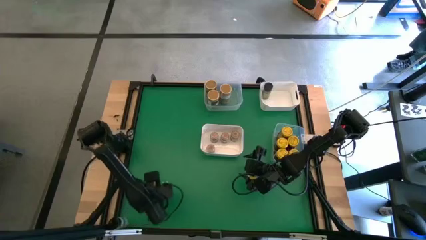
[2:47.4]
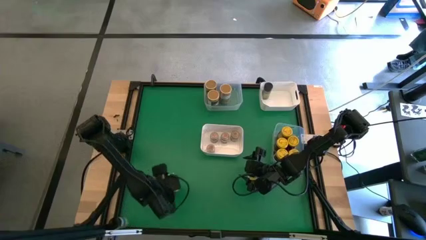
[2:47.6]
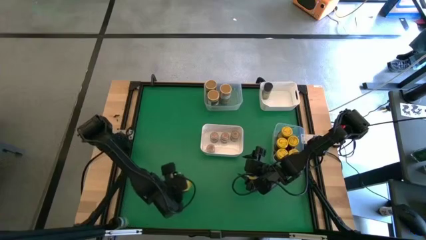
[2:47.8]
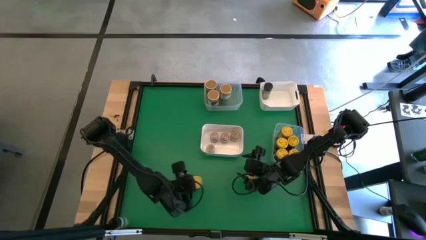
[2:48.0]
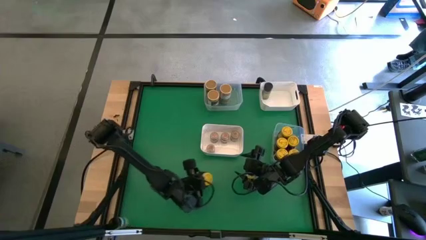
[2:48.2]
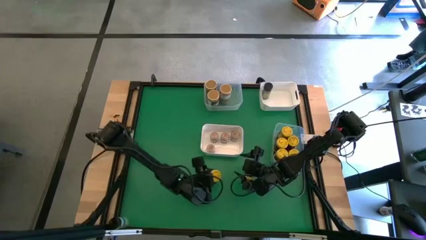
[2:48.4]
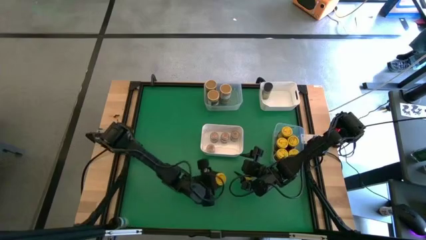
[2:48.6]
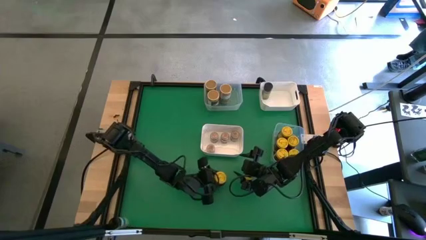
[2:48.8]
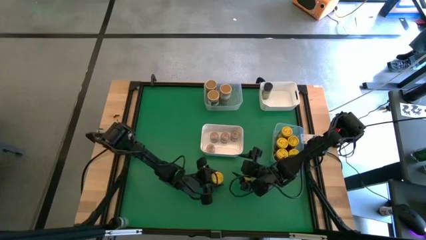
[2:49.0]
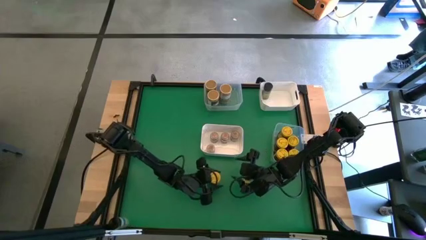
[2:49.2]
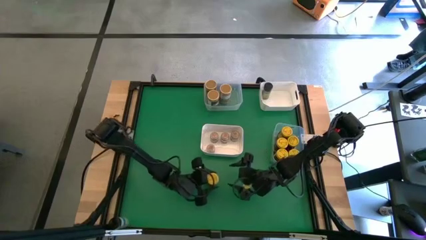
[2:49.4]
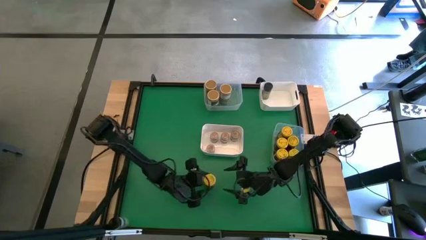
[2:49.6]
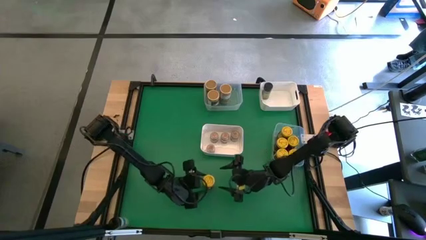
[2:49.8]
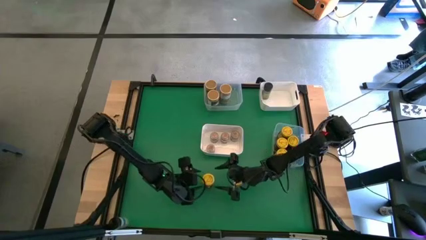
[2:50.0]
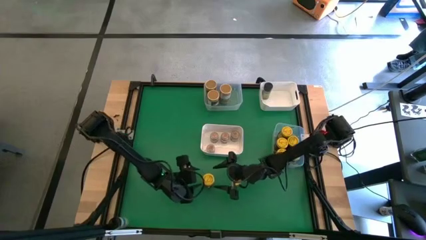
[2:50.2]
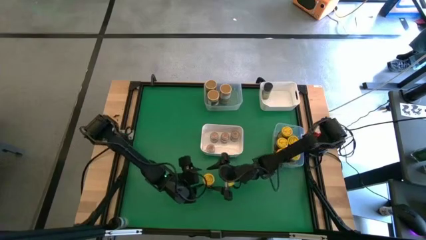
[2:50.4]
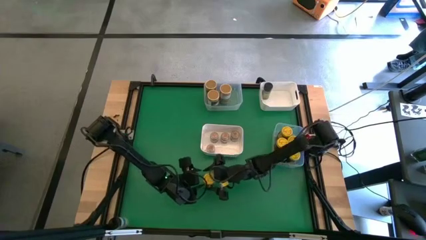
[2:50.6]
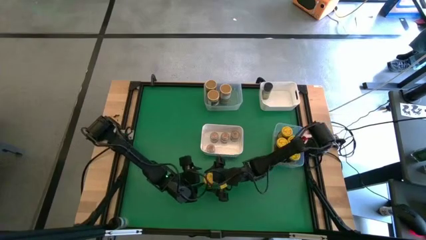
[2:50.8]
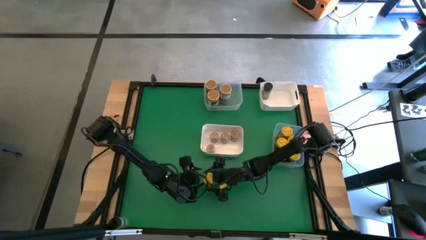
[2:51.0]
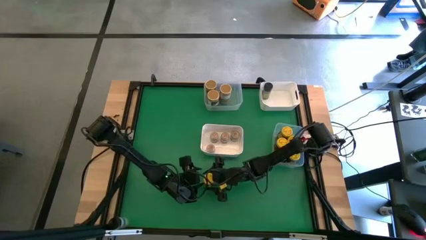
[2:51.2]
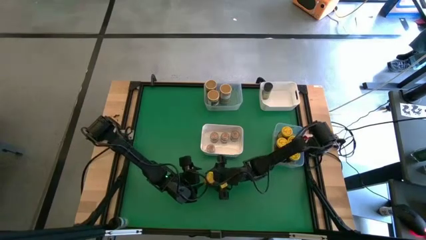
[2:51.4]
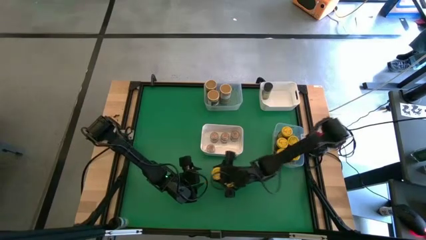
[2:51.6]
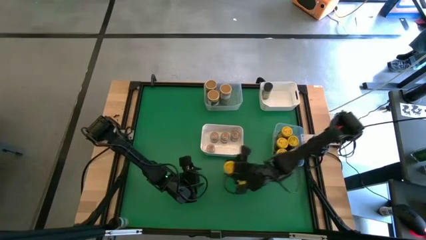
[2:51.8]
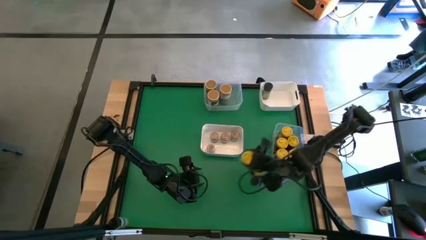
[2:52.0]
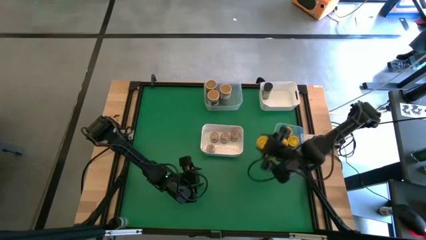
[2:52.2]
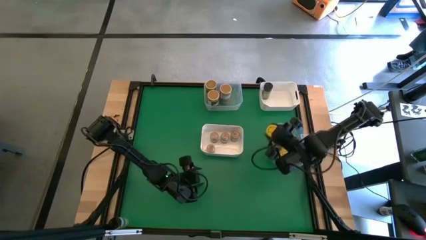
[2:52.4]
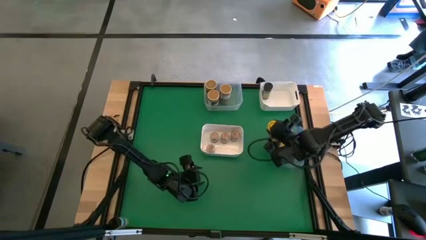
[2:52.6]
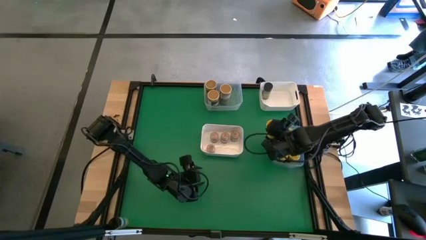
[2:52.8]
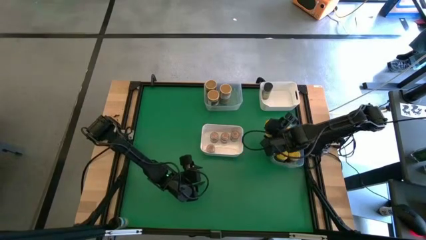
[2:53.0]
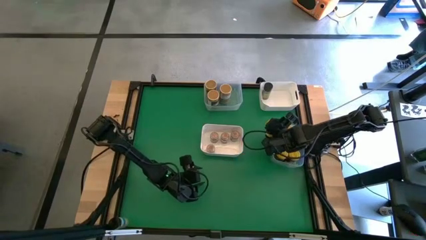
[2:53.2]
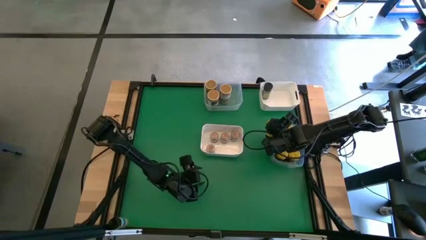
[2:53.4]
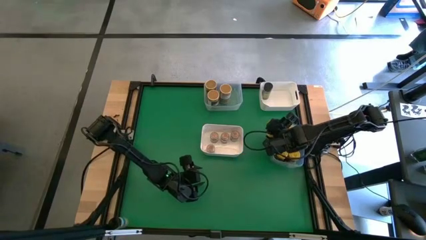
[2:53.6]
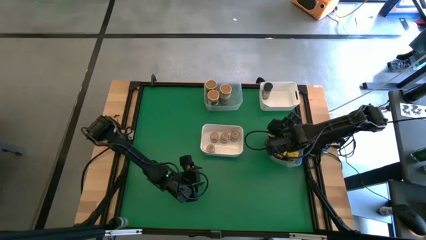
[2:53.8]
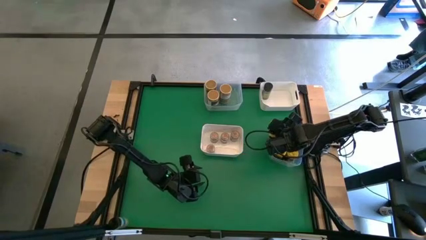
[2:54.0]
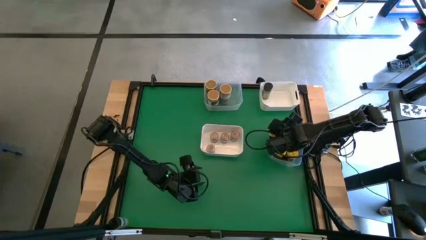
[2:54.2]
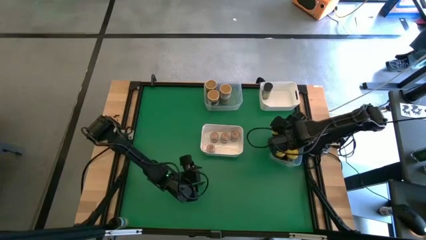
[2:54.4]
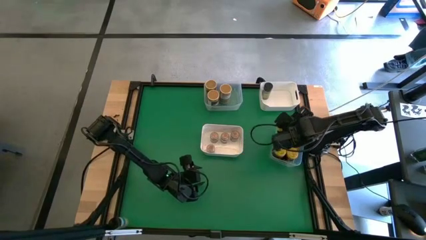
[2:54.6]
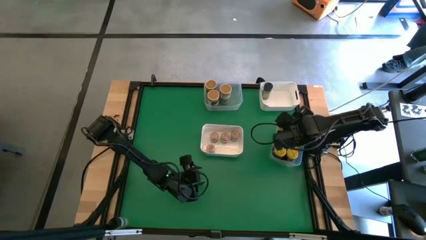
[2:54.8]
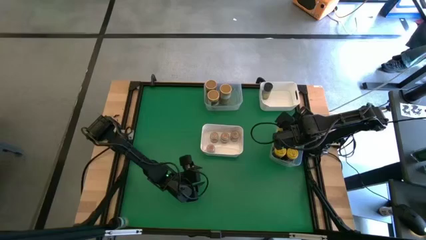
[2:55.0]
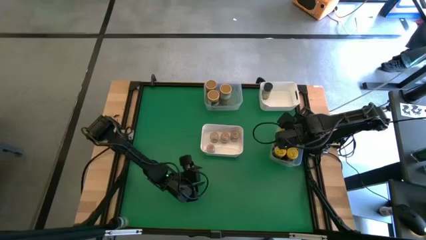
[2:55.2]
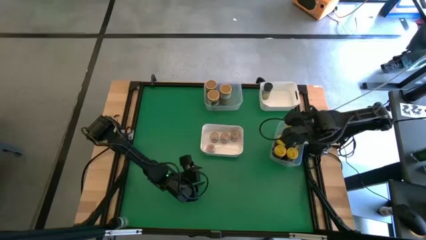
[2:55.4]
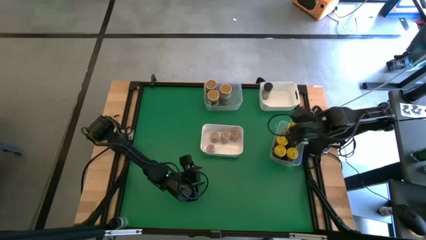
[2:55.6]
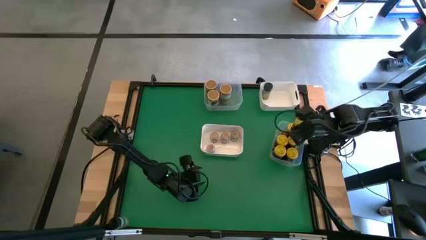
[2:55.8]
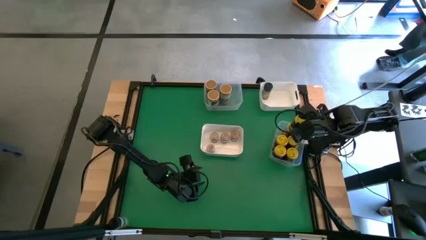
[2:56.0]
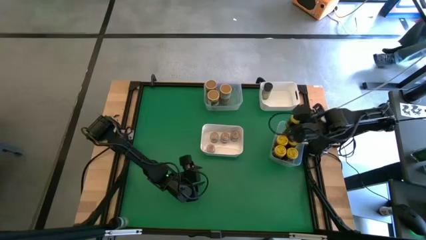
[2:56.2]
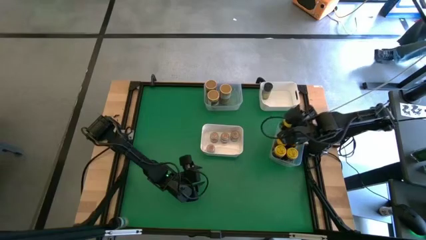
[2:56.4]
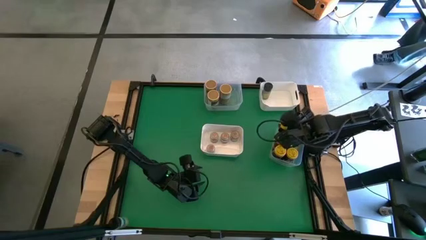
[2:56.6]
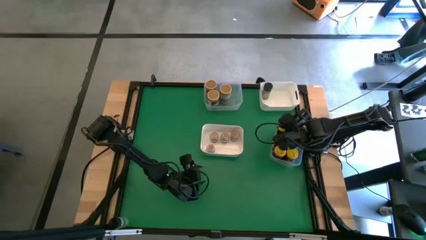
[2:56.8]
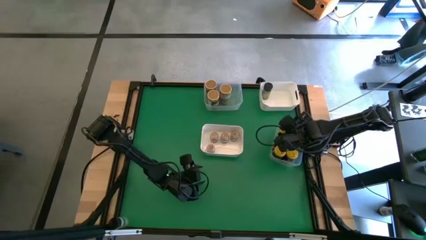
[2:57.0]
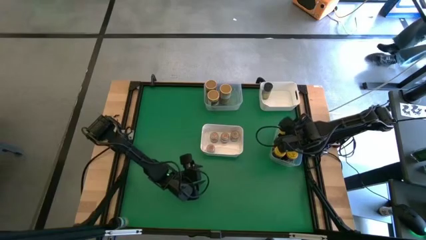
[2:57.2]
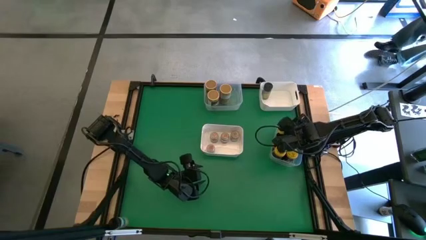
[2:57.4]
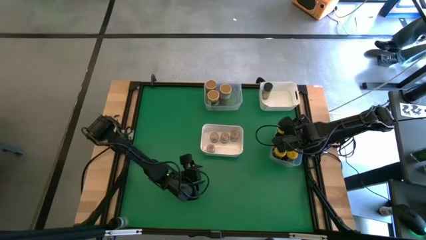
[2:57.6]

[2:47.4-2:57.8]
Task: Sort spices by type
Put the yellow seasoning can into the bottom transparent bin

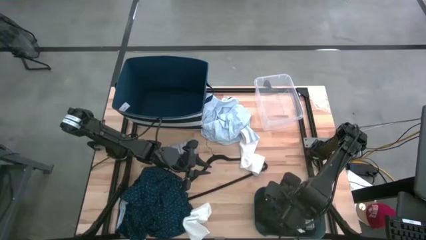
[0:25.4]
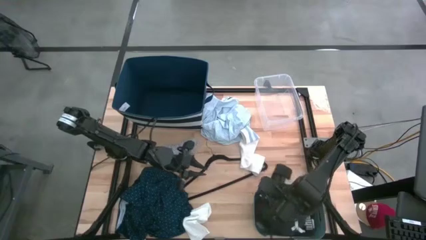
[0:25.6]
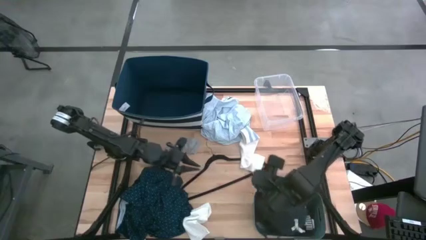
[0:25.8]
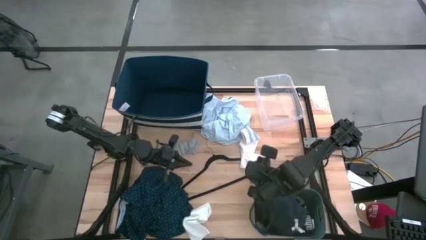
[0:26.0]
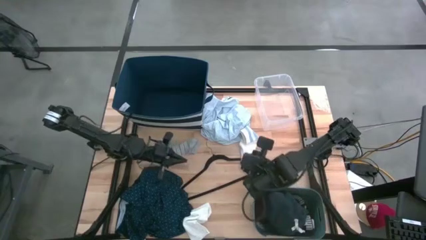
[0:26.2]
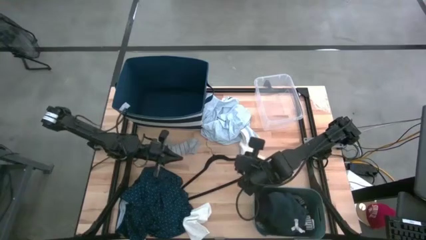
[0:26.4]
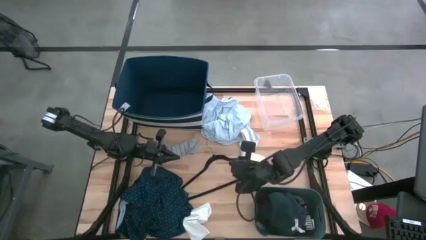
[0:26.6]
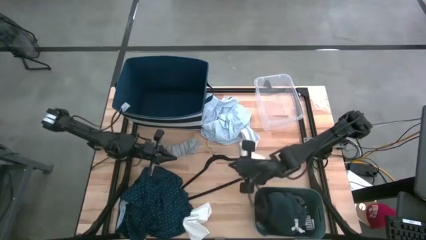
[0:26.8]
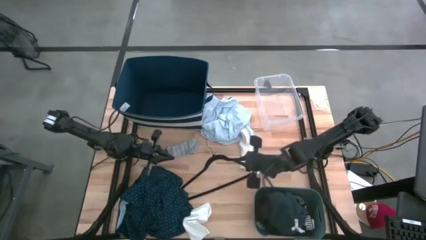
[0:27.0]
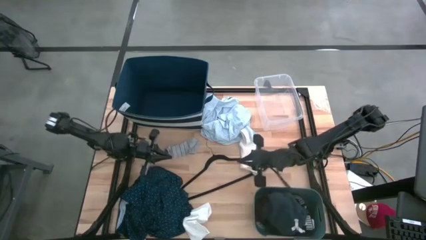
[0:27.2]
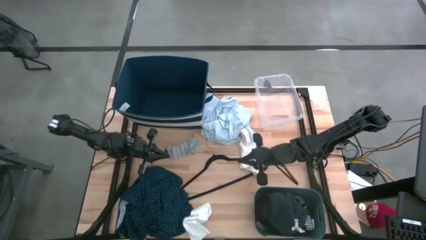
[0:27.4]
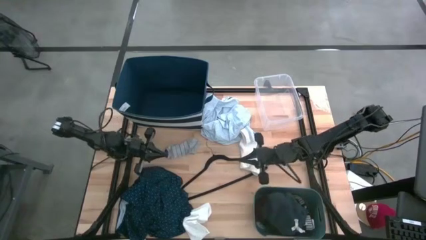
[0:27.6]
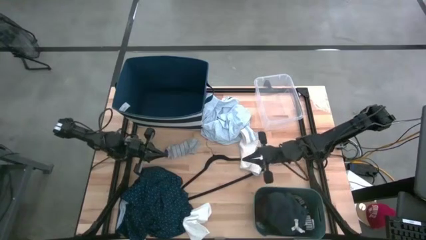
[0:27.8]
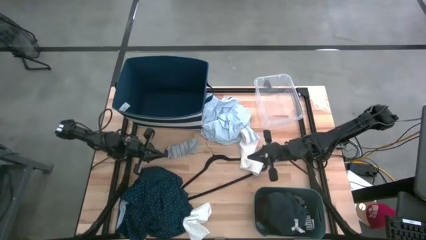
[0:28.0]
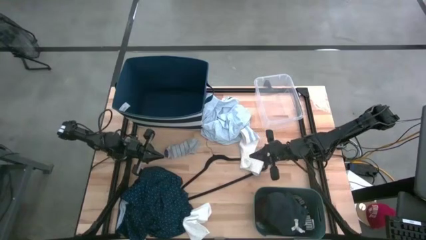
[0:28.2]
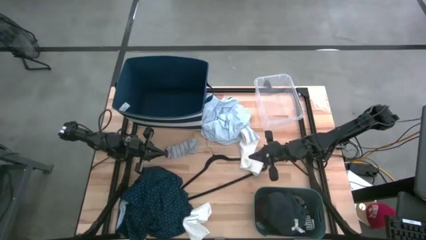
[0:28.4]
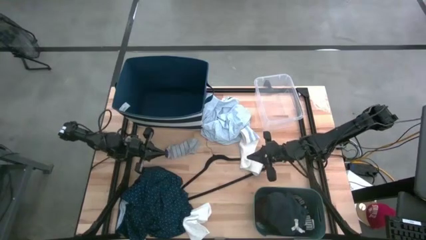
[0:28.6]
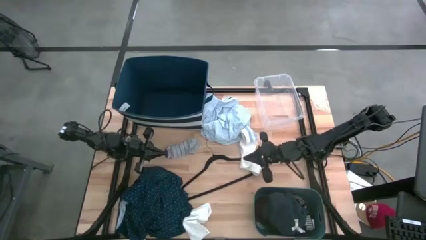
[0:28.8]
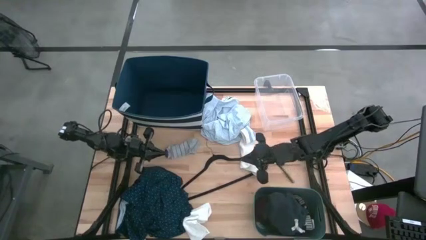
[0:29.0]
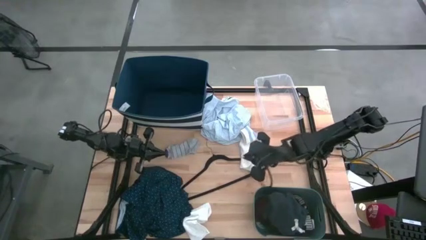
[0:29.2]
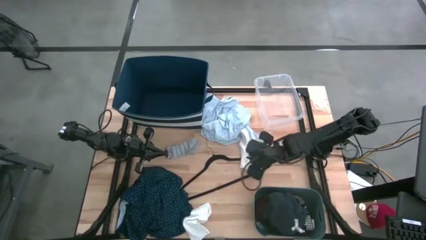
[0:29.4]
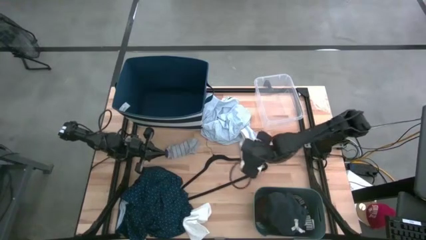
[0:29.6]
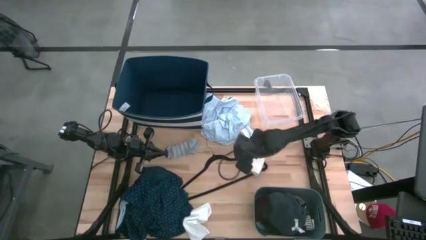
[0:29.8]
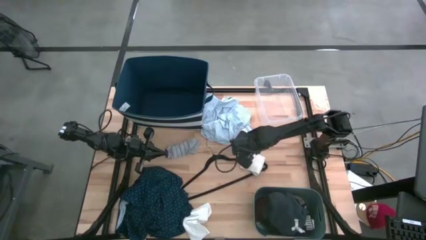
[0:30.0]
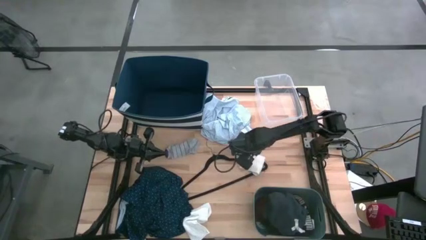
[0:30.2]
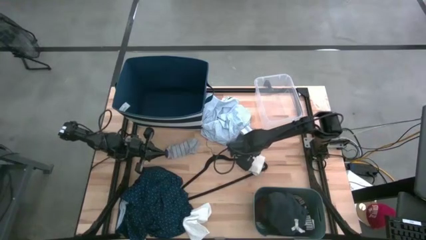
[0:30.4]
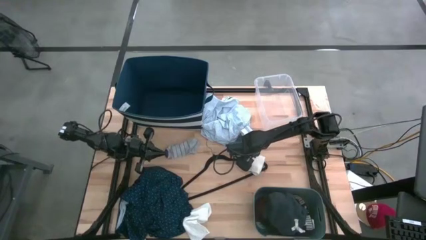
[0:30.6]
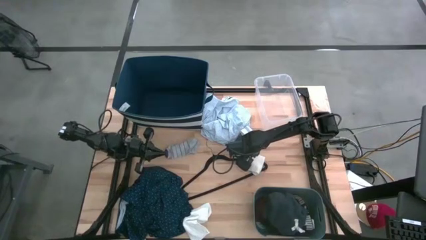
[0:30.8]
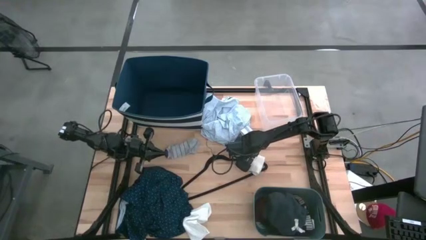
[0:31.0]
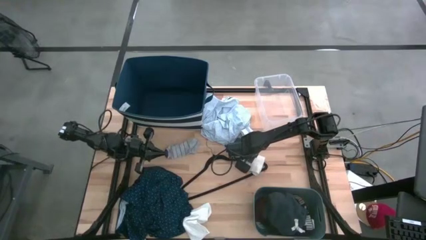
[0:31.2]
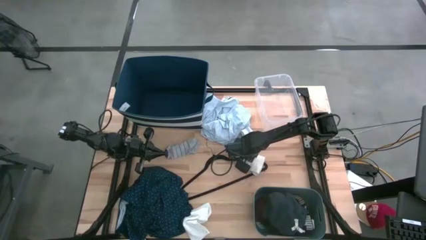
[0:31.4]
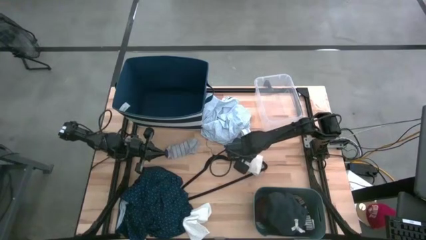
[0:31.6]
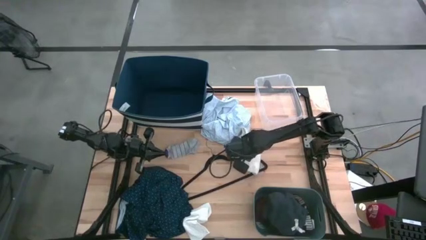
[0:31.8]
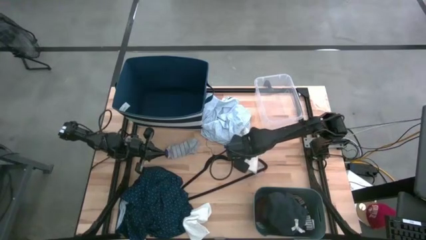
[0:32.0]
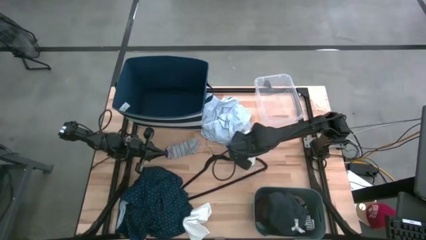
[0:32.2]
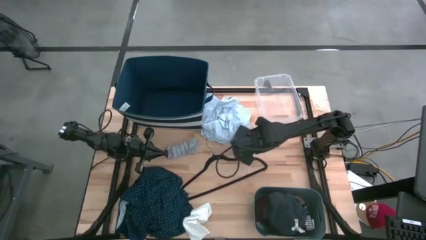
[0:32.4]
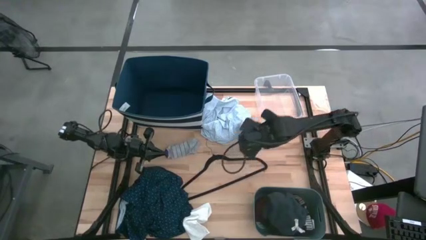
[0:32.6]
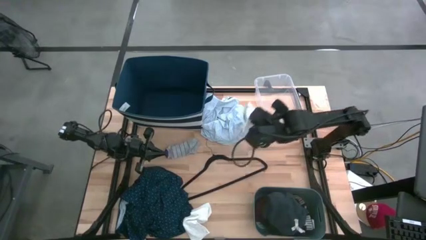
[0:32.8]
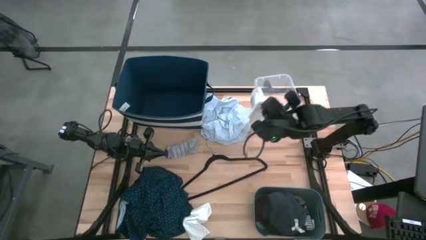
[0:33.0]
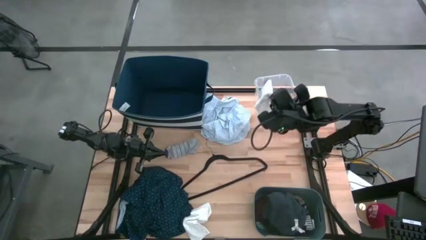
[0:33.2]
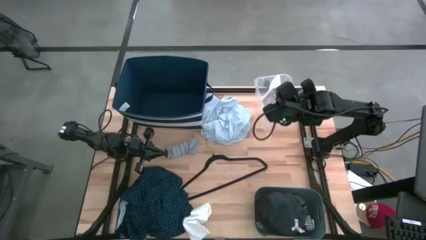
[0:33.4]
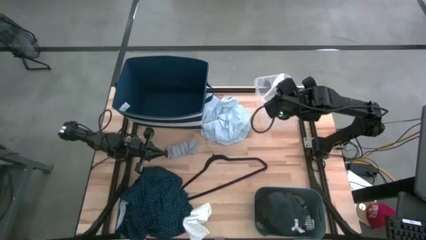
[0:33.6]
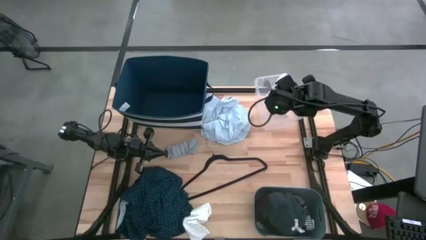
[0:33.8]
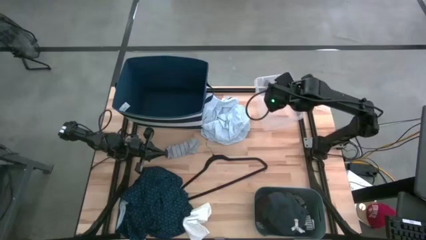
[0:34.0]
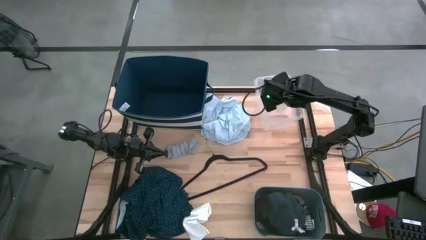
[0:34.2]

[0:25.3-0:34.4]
Task: Pick & Place Cloths
Put the white patterned sock into the transparent bin
